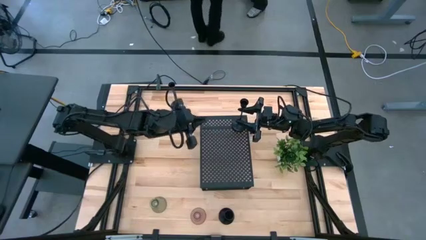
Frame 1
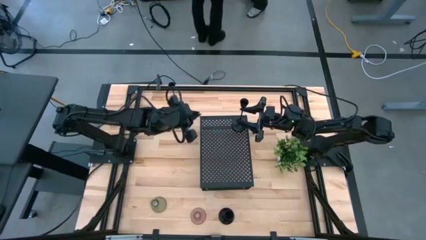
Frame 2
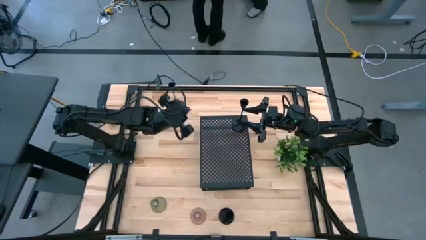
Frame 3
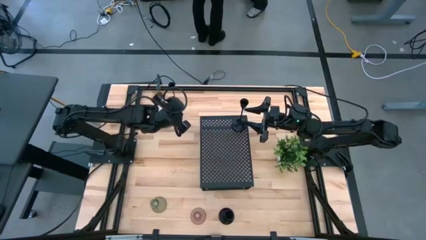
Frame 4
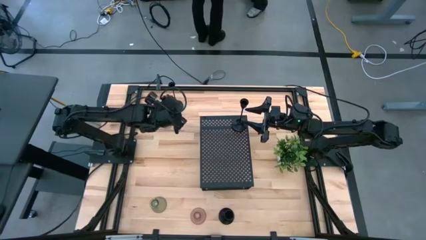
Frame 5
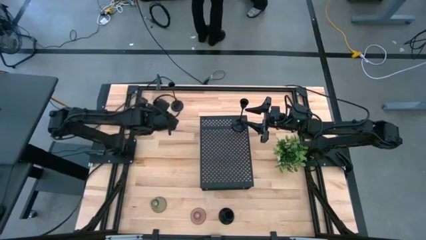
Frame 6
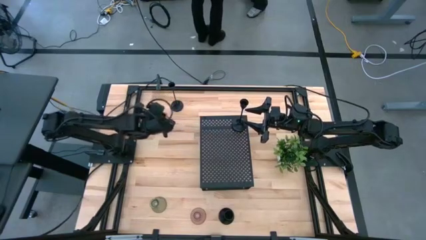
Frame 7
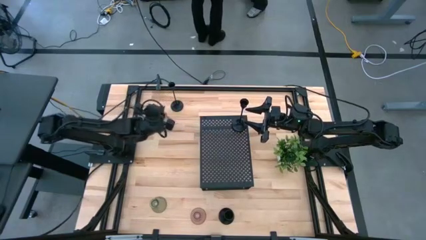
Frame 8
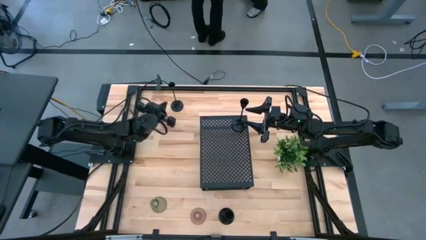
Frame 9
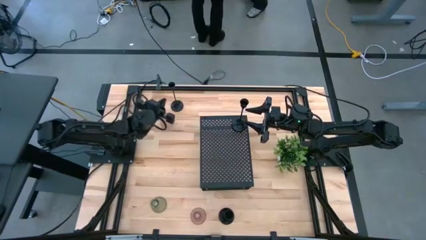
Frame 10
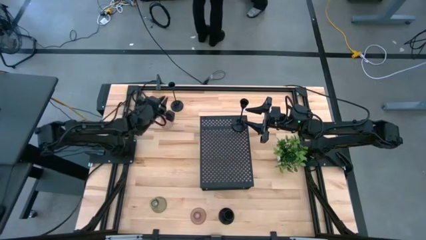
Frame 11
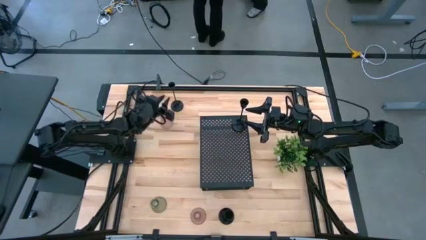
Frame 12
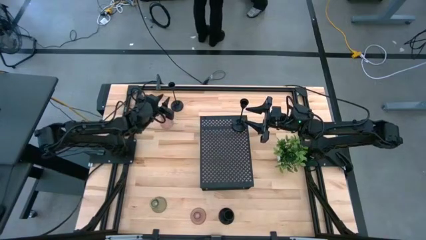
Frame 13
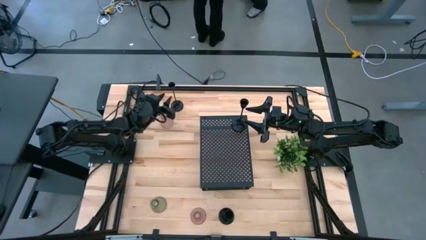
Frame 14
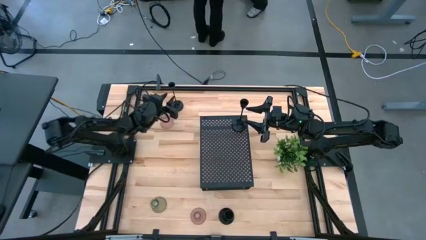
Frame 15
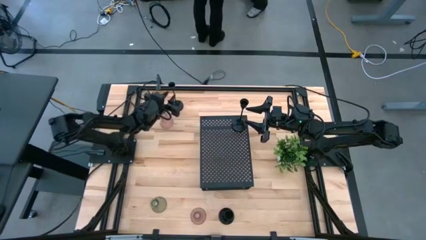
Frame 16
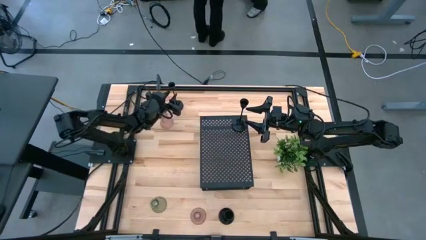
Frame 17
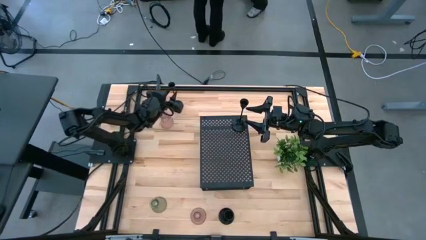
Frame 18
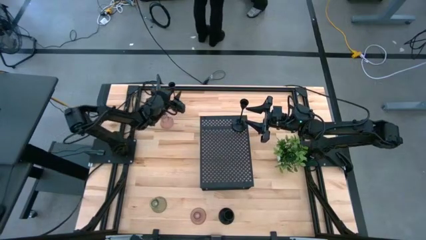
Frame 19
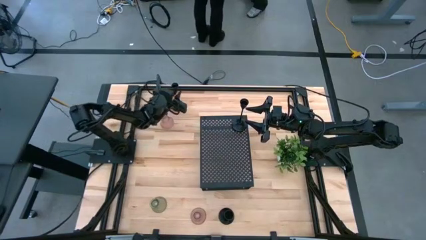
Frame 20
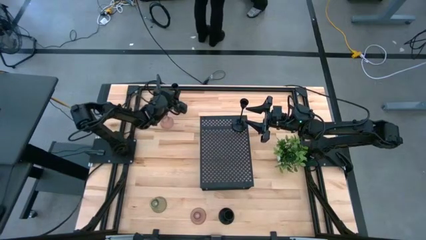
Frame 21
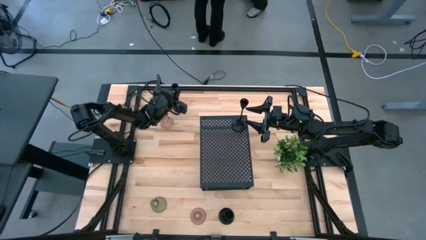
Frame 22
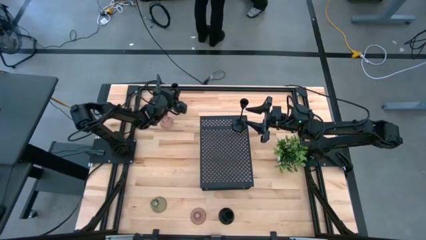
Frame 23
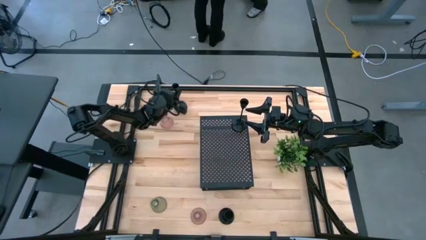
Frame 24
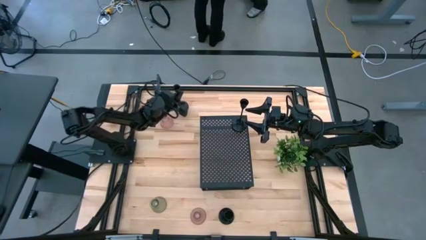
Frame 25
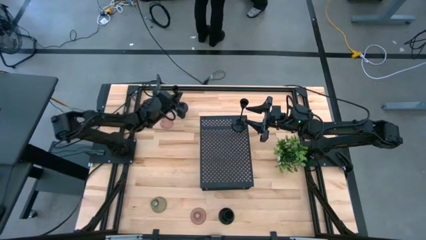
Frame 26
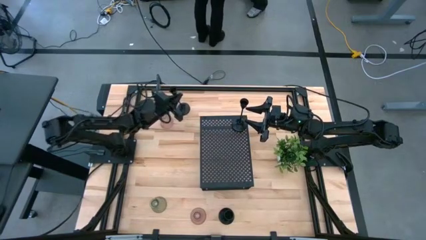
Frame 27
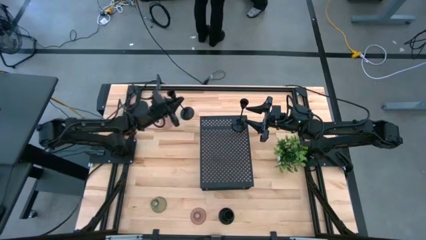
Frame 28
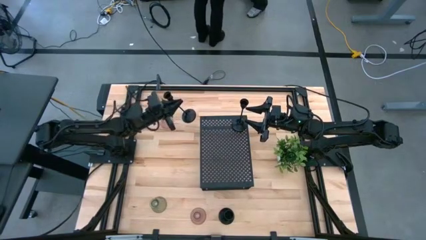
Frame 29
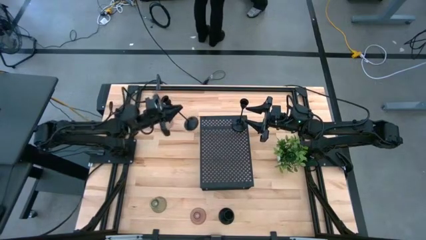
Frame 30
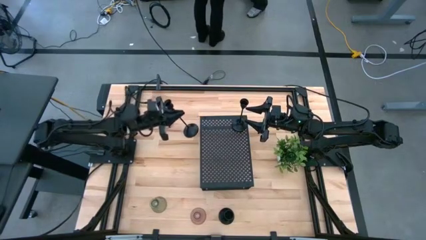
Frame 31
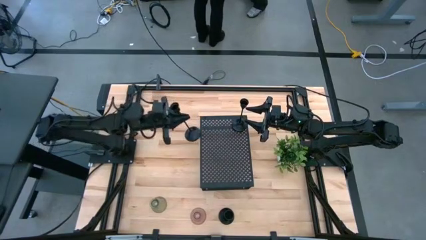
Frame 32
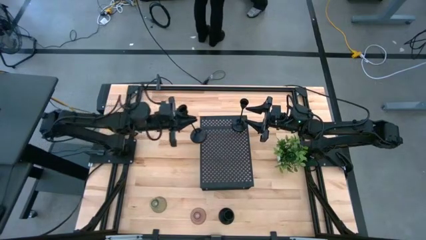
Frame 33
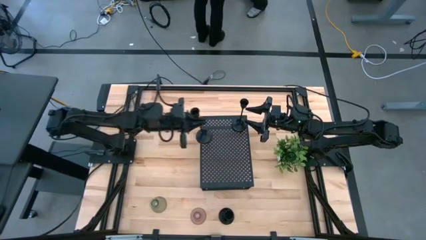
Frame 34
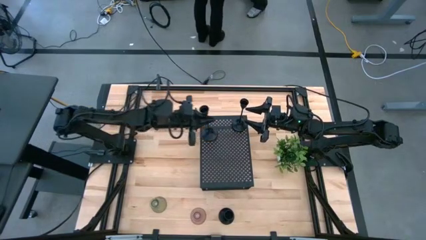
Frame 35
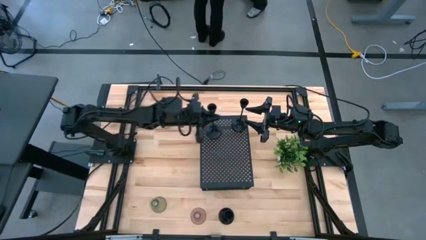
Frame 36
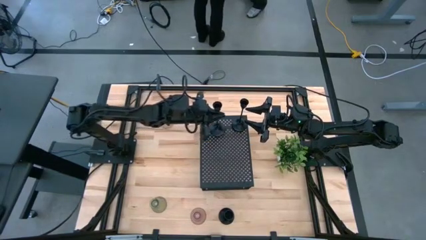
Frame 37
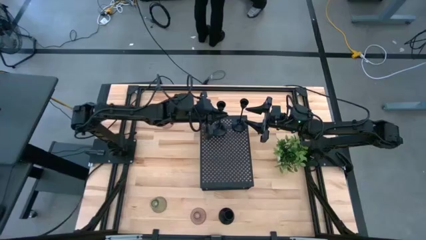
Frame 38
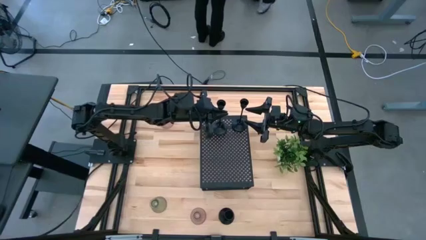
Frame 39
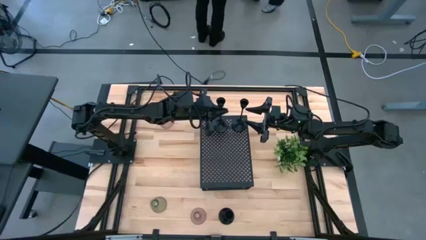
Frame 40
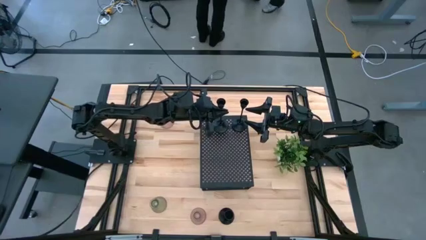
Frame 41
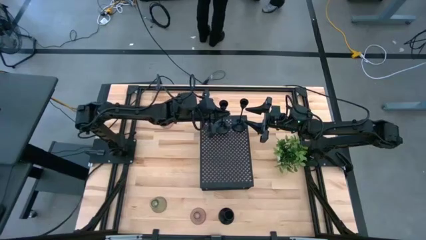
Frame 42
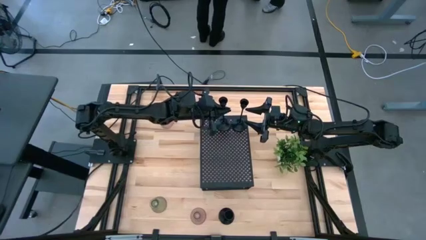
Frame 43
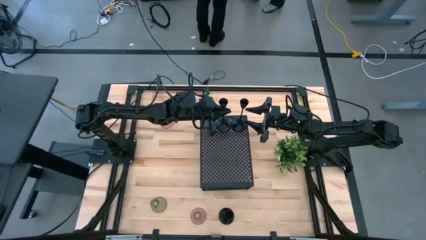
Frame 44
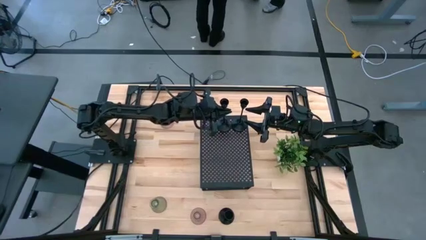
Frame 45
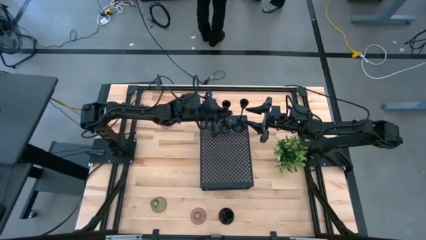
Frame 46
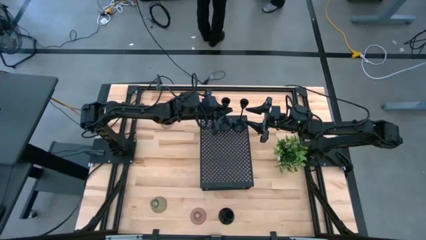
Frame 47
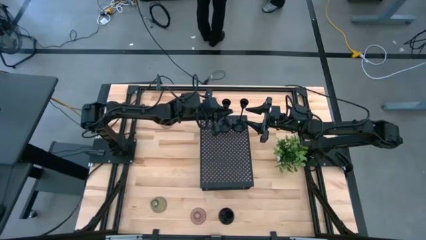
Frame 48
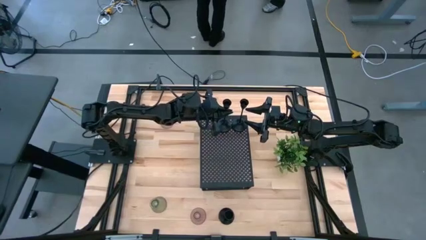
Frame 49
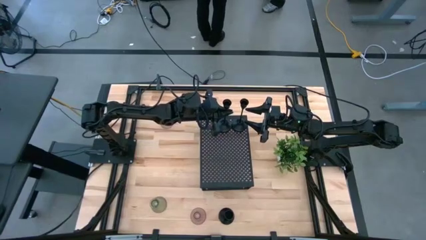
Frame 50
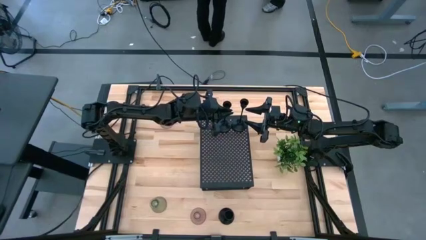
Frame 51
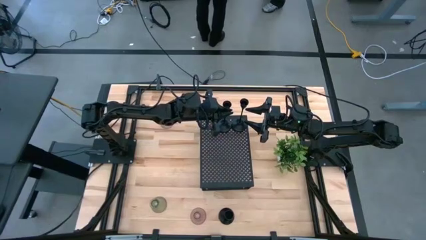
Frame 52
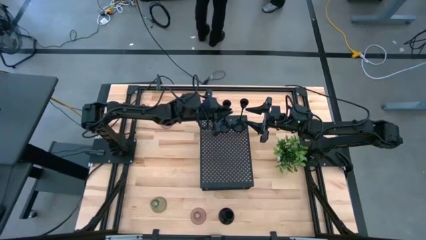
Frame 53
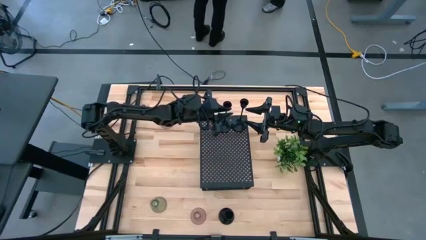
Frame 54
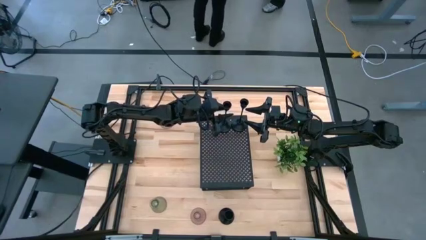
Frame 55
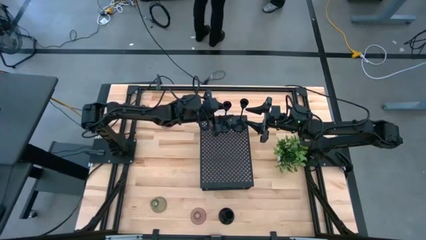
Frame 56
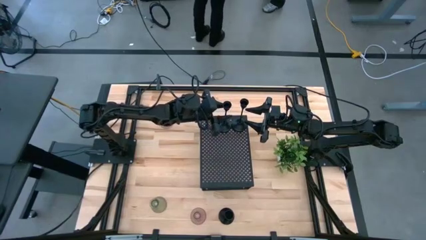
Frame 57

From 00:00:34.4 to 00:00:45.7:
Task: Pick & Place candle stick holders
Align the top black candle holder with the other black candle holder on the shelf
